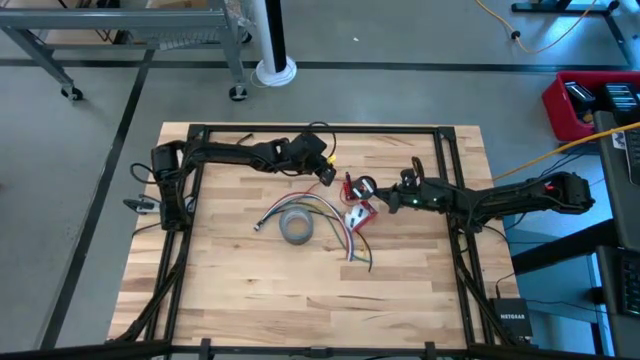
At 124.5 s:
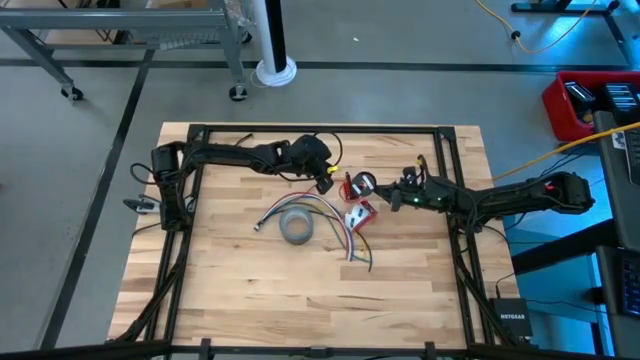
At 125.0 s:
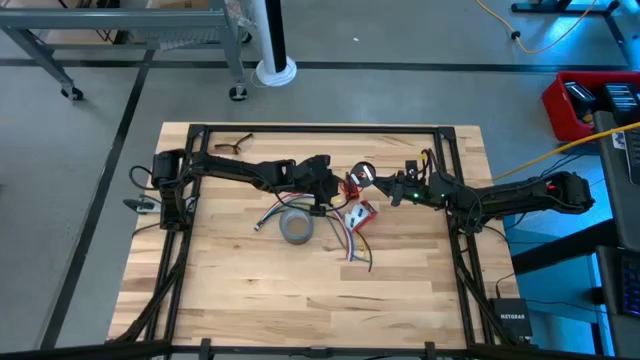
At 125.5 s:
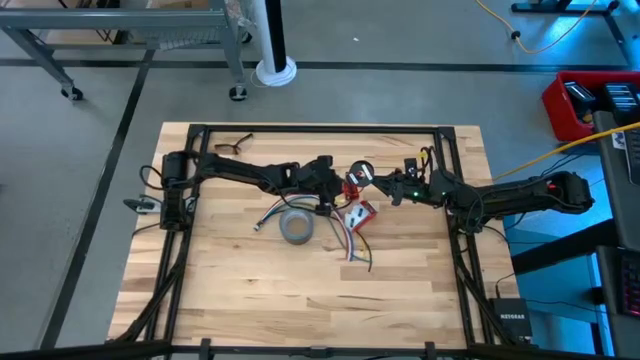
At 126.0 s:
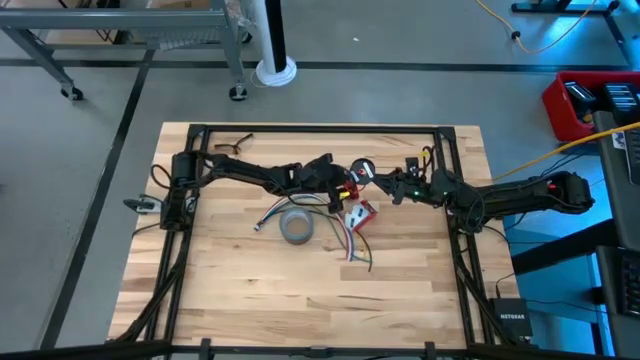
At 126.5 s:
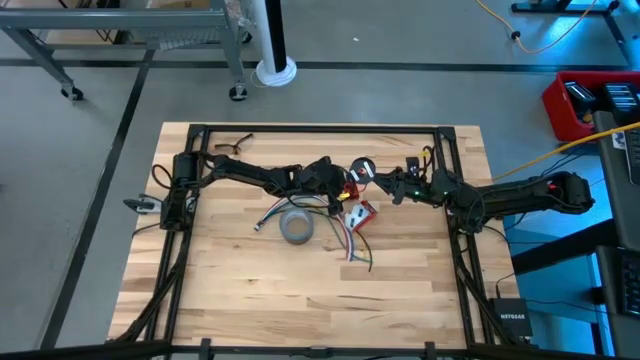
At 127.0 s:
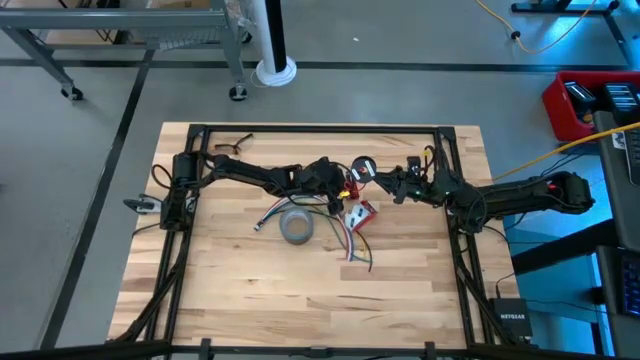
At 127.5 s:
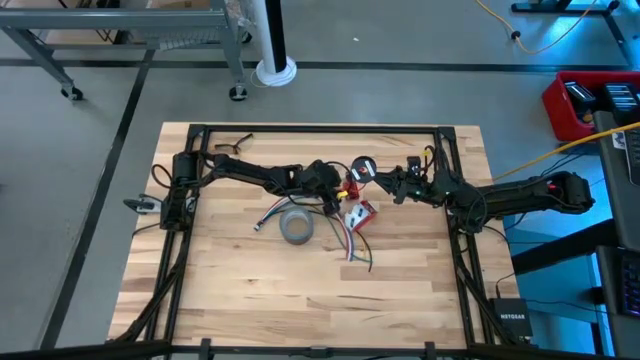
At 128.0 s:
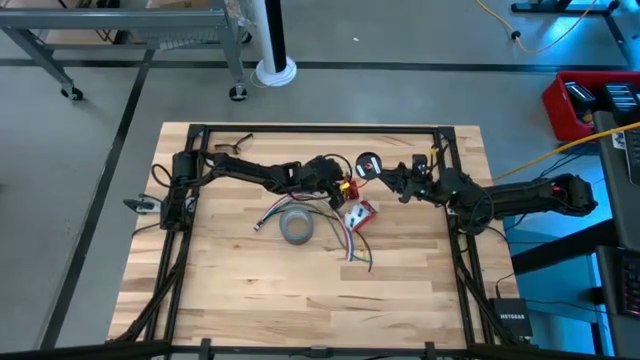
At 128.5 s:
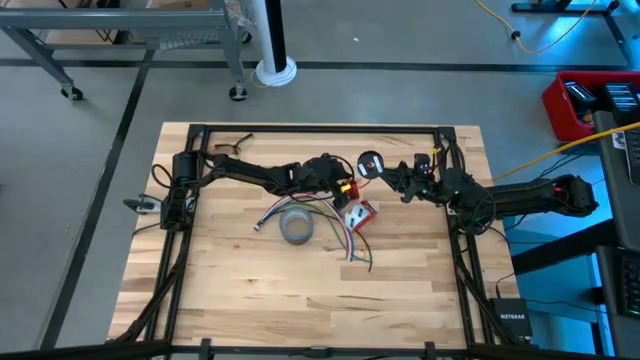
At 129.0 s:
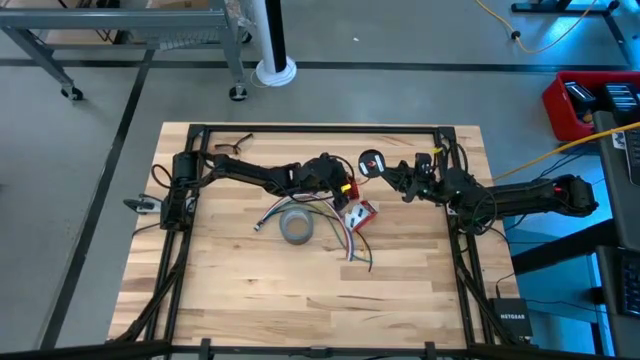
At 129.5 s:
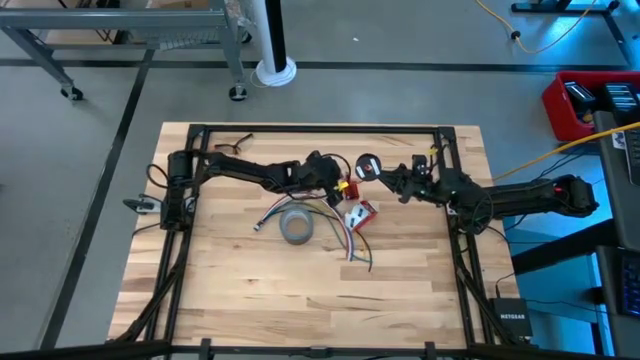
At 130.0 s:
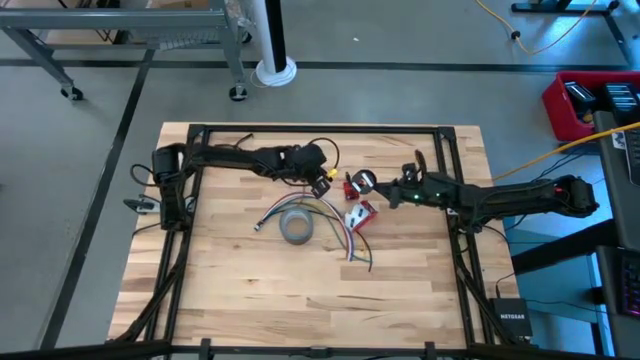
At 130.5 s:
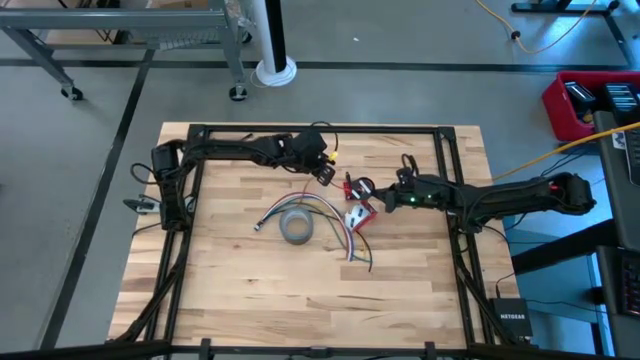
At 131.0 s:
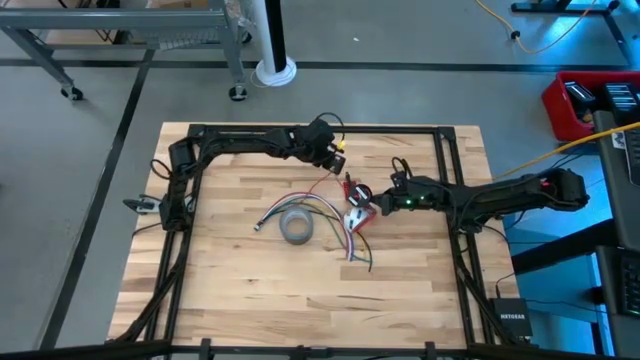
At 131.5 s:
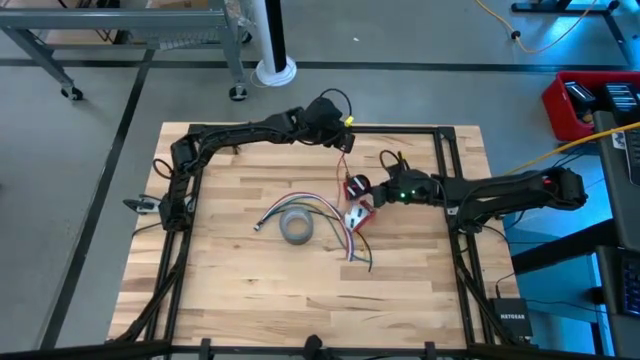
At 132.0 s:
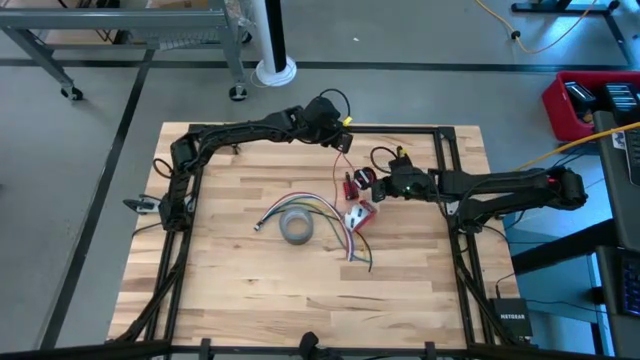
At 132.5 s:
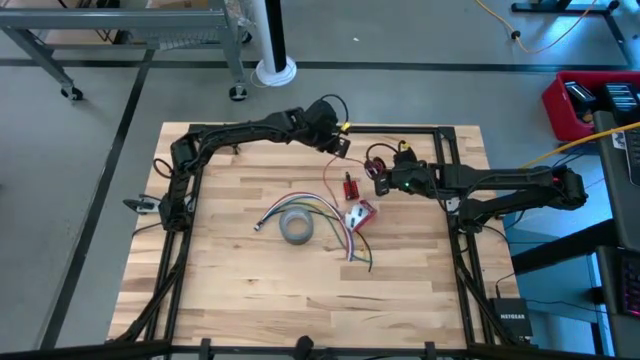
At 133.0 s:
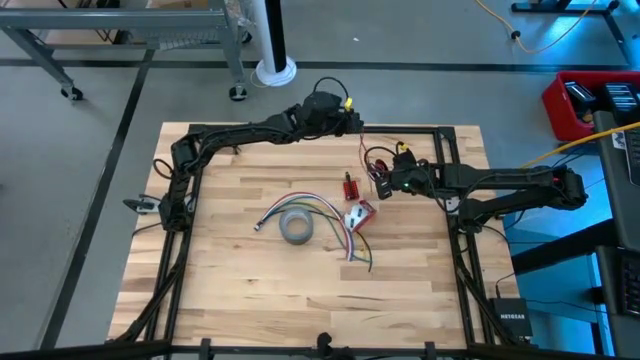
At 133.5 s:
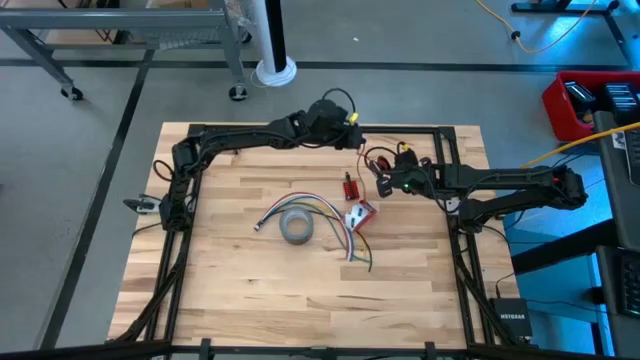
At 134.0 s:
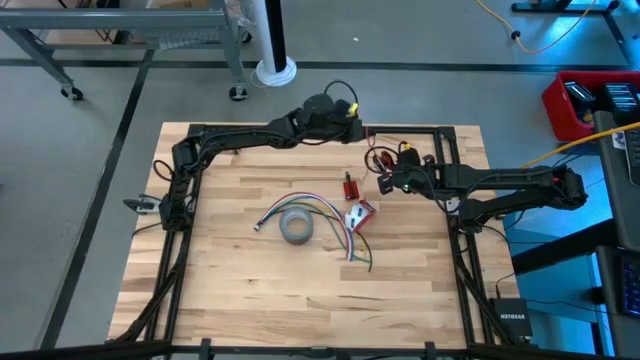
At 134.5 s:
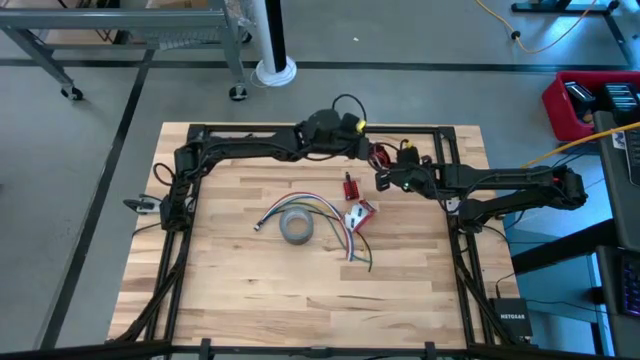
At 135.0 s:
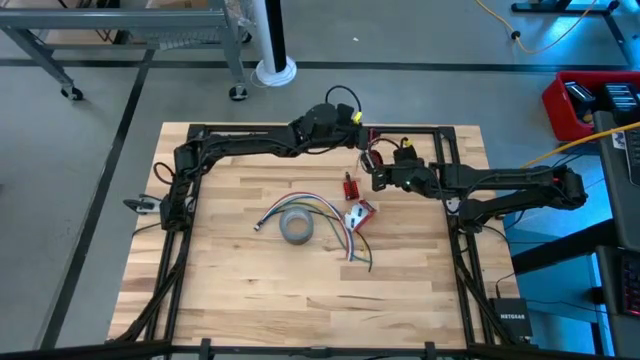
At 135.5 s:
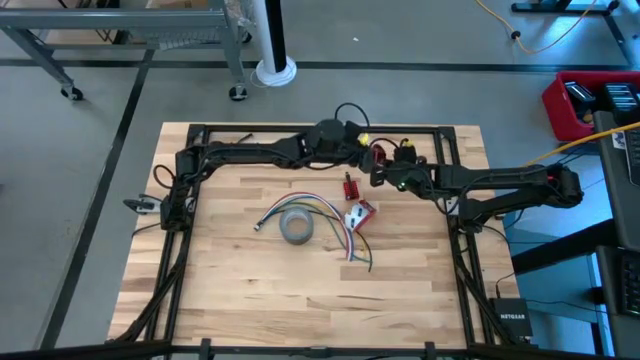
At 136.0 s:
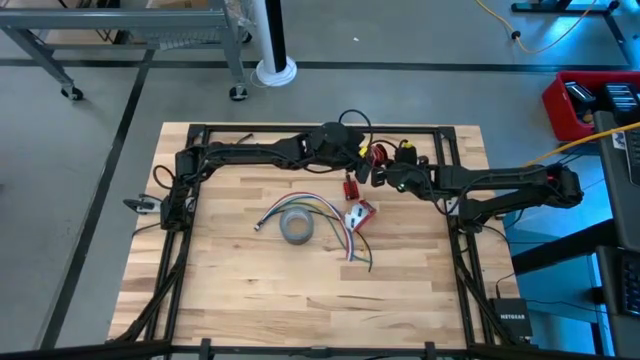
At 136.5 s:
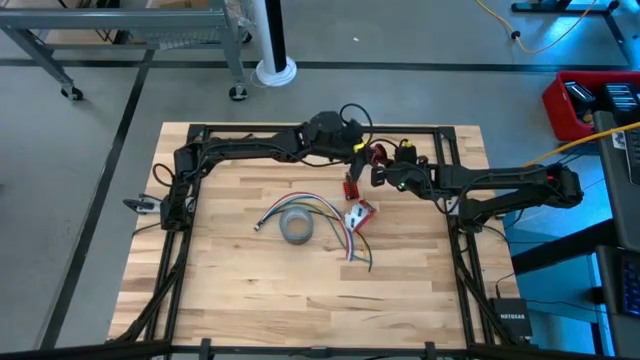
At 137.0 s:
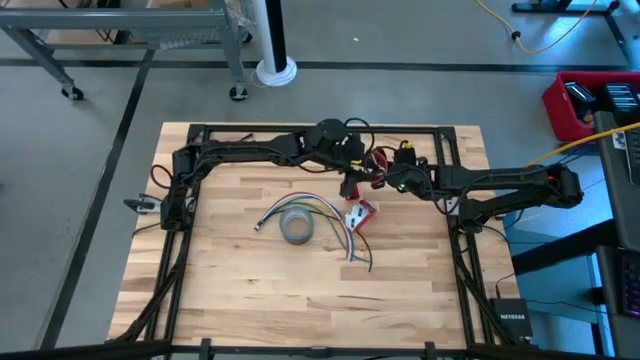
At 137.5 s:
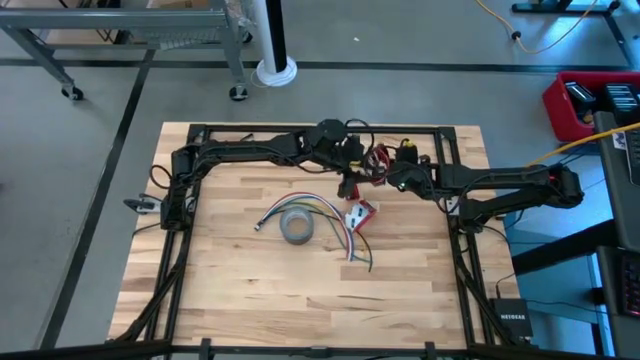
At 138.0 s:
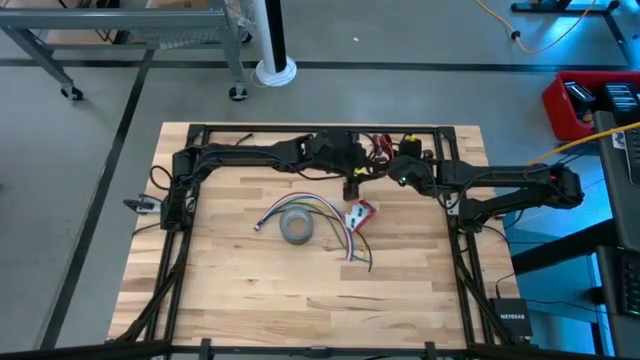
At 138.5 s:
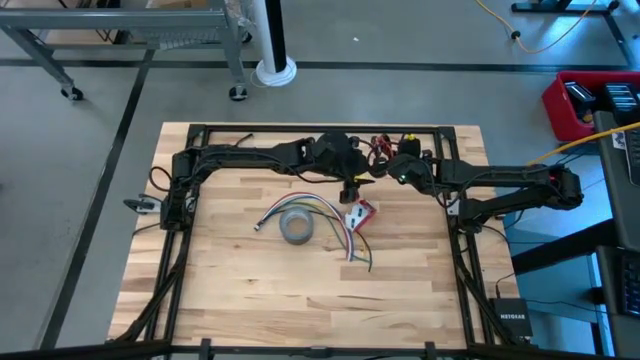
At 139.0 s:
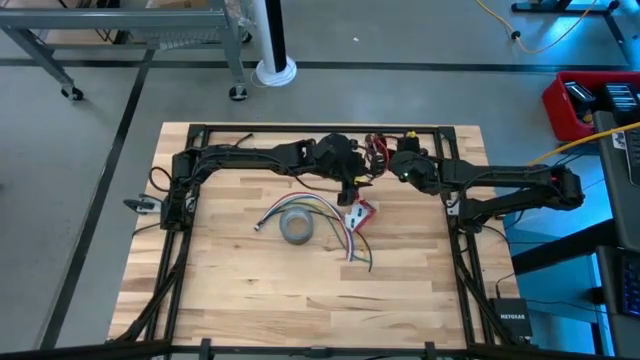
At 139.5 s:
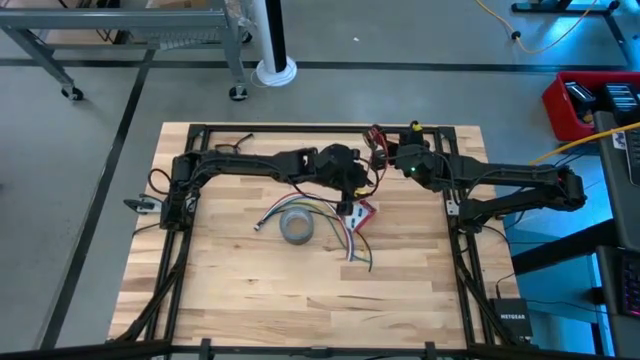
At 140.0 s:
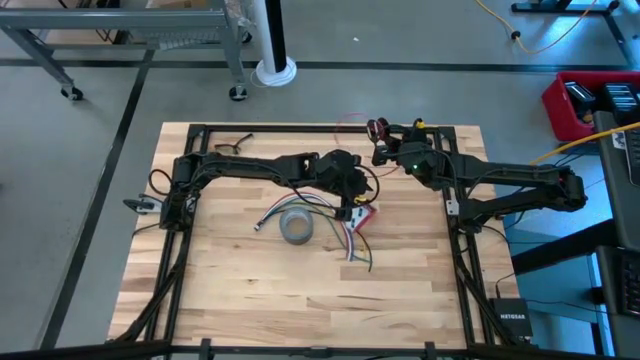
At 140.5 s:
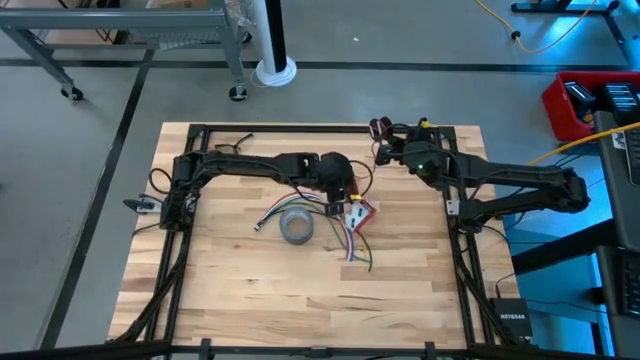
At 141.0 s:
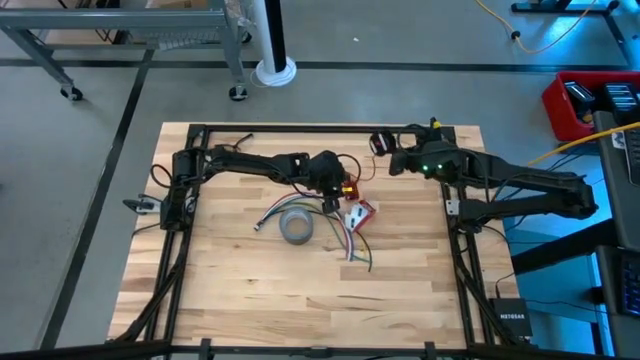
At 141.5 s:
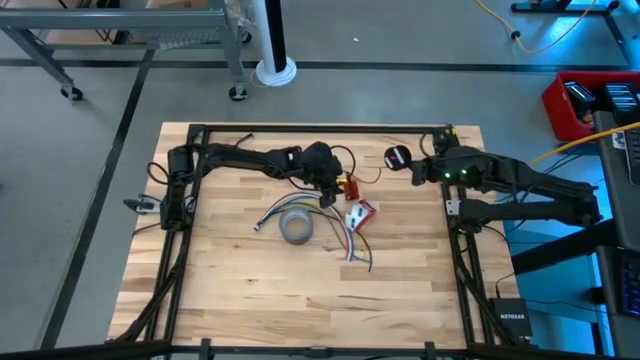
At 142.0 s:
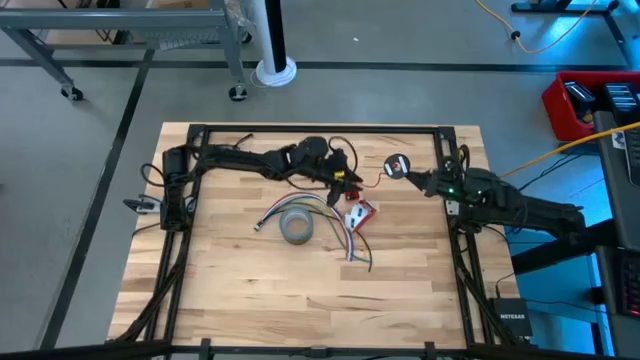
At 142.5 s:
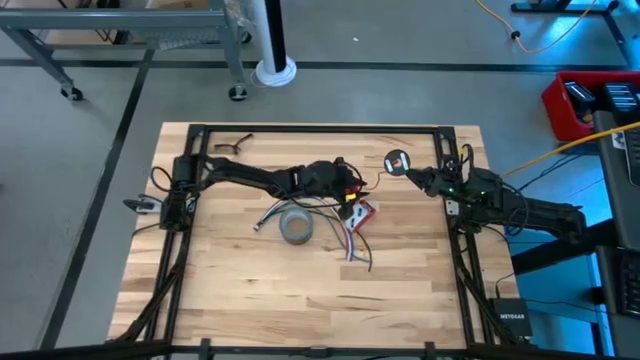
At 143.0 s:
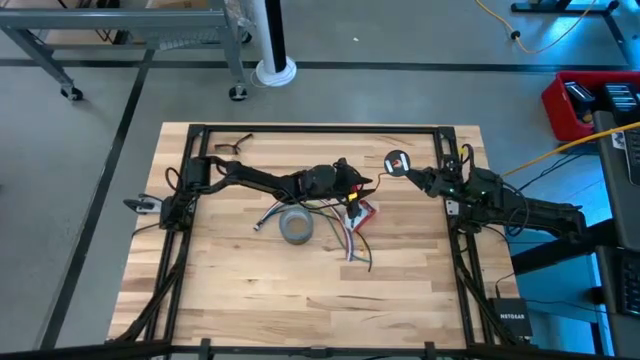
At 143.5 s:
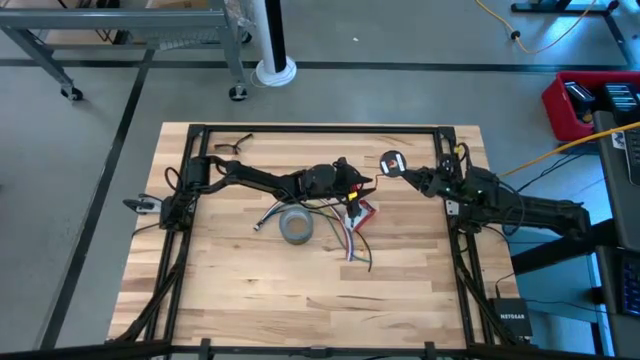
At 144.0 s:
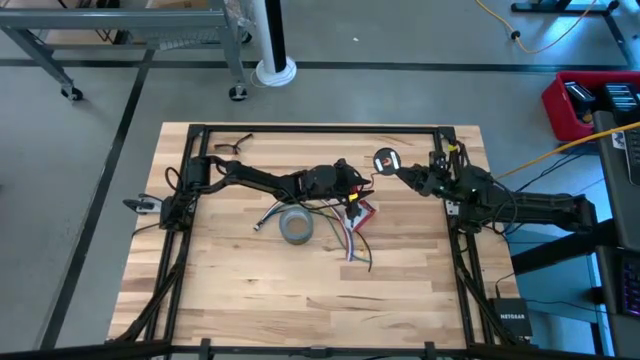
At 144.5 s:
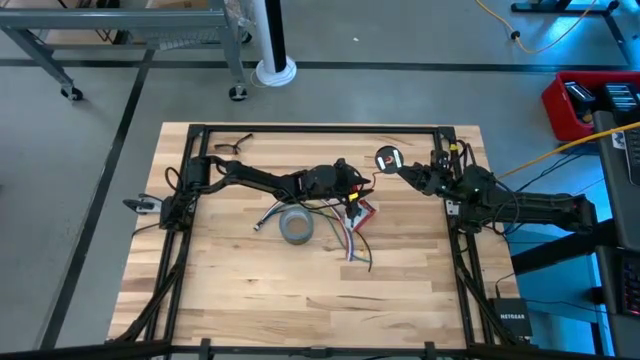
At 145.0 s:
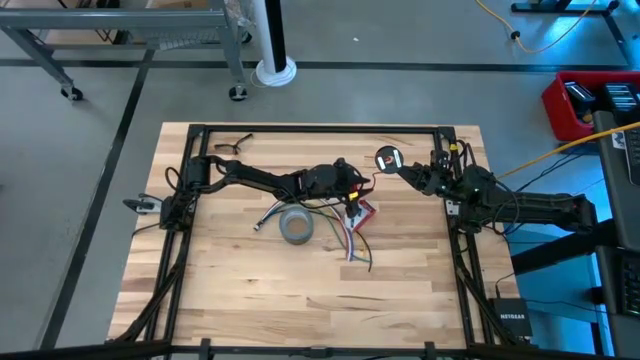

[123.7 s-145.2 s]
Task: Coil cords
Coil the red wire on the black spool
